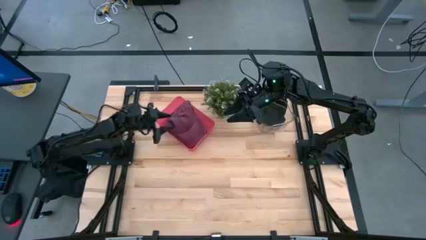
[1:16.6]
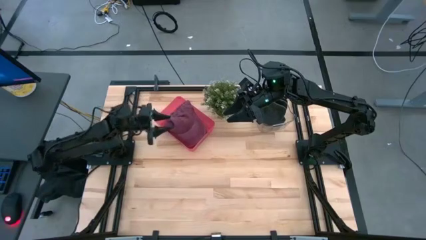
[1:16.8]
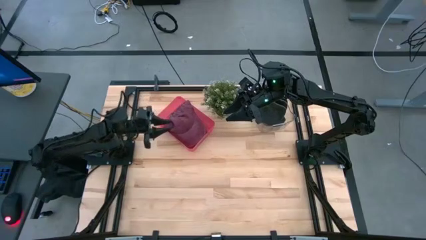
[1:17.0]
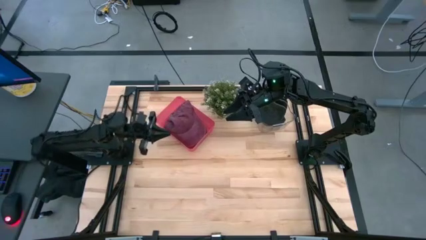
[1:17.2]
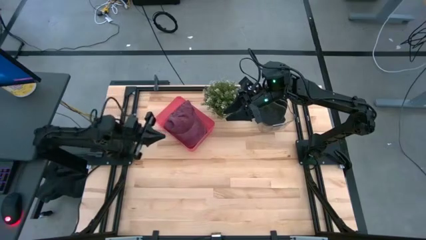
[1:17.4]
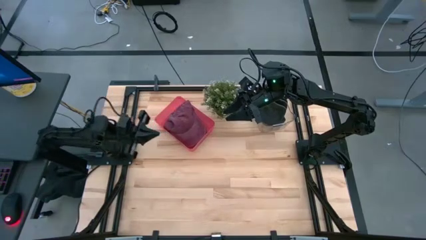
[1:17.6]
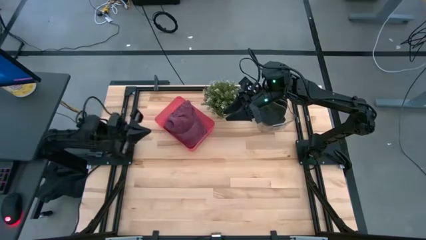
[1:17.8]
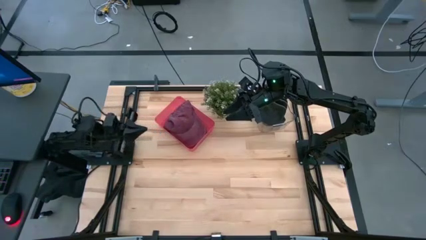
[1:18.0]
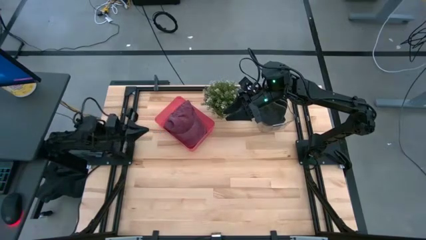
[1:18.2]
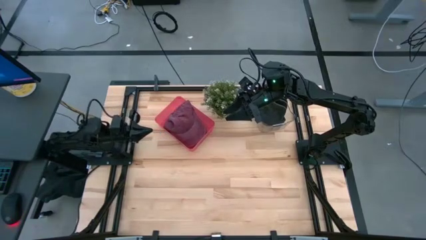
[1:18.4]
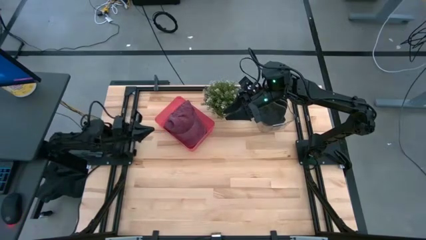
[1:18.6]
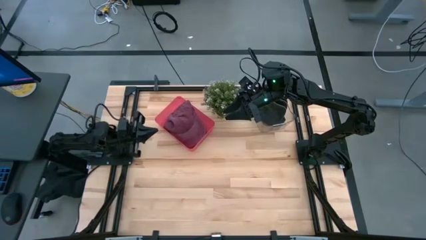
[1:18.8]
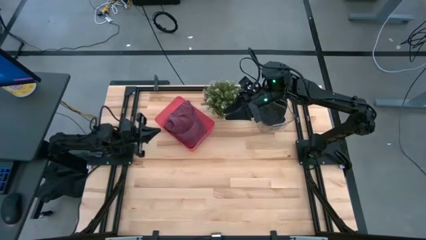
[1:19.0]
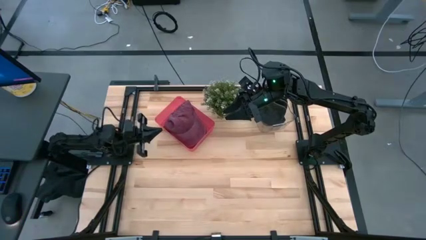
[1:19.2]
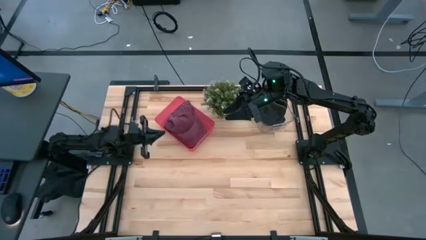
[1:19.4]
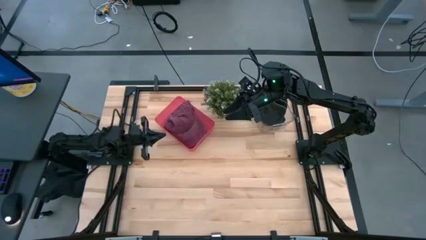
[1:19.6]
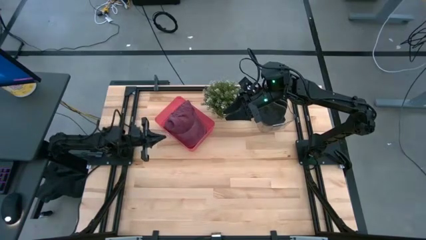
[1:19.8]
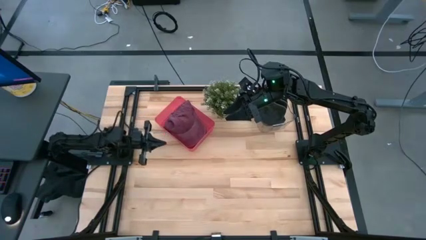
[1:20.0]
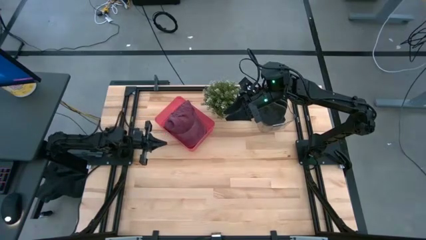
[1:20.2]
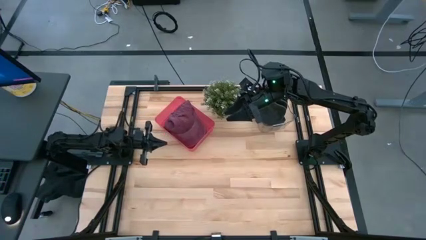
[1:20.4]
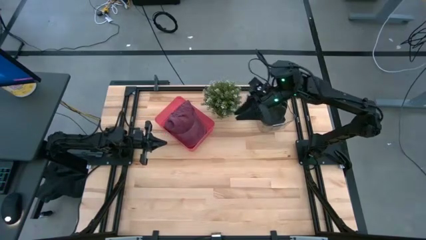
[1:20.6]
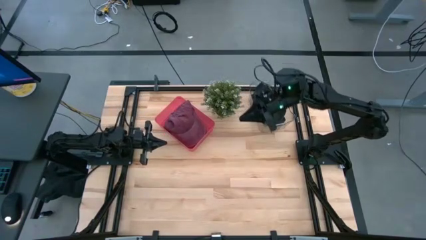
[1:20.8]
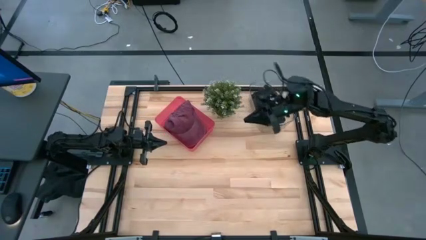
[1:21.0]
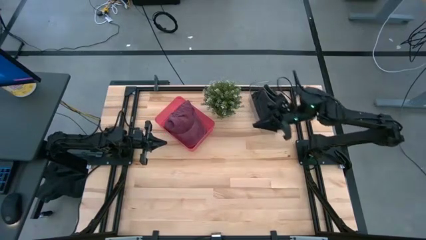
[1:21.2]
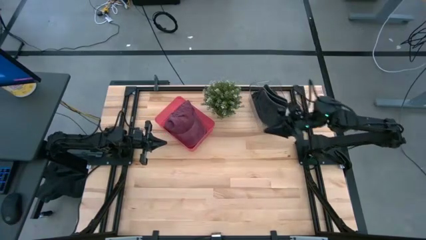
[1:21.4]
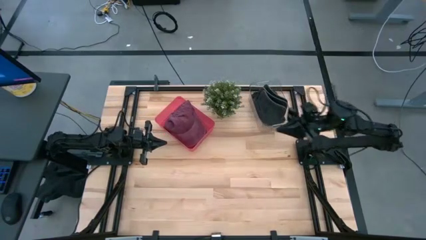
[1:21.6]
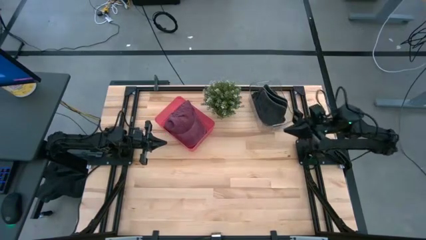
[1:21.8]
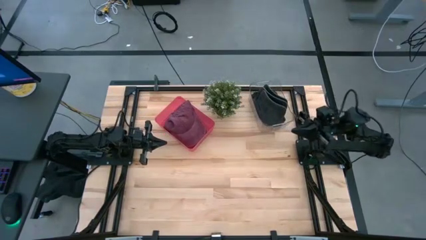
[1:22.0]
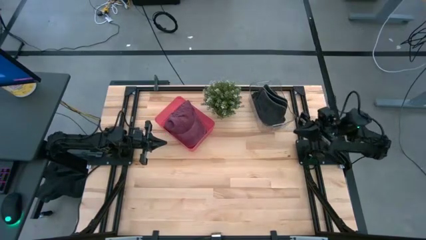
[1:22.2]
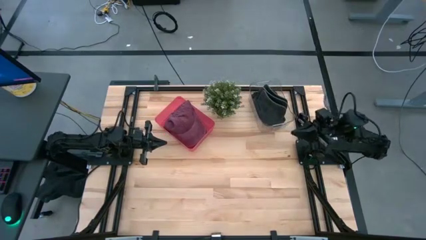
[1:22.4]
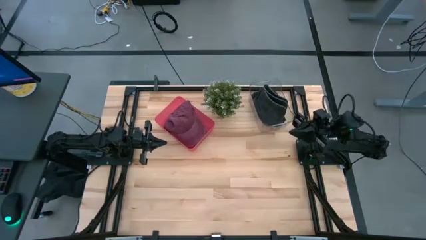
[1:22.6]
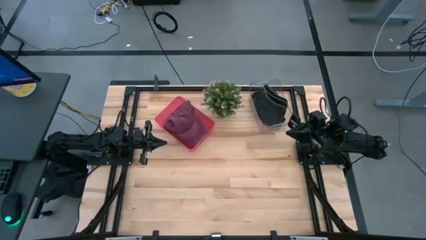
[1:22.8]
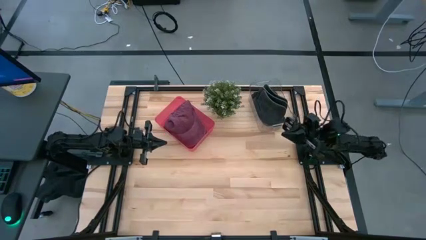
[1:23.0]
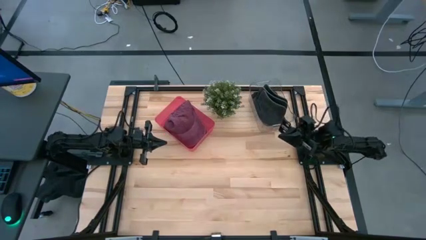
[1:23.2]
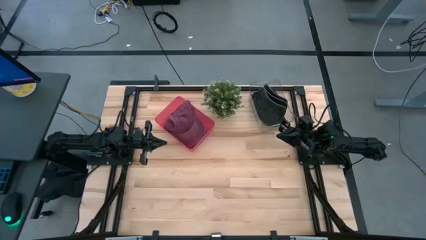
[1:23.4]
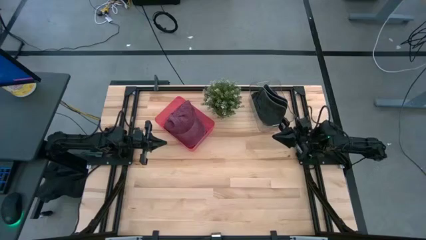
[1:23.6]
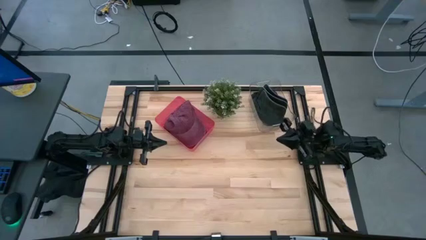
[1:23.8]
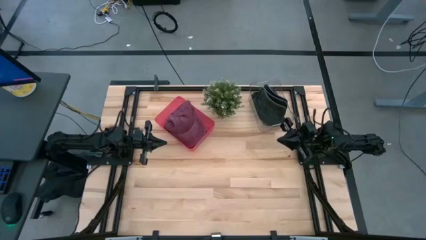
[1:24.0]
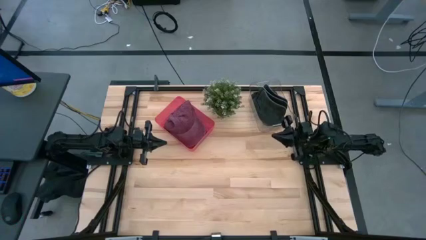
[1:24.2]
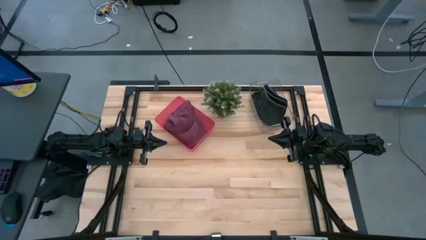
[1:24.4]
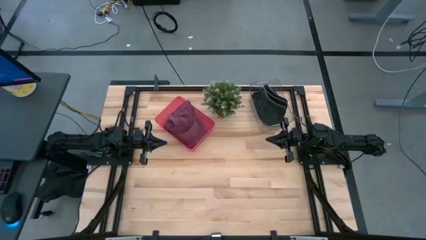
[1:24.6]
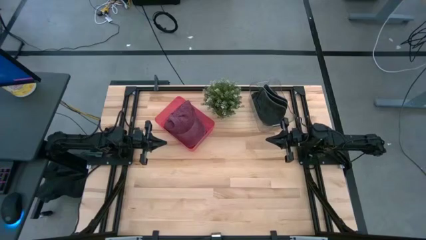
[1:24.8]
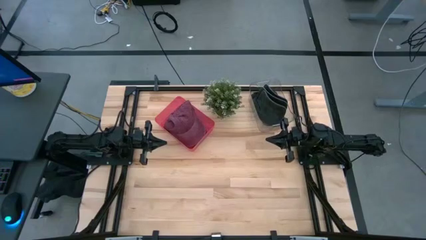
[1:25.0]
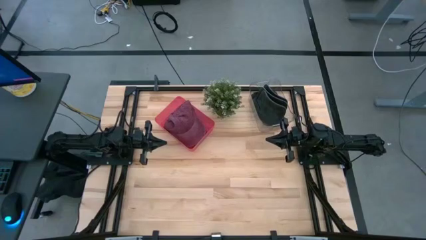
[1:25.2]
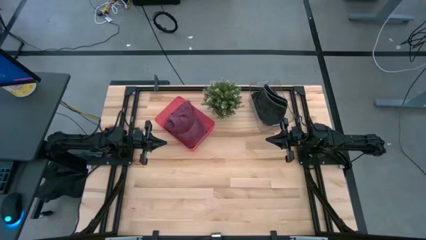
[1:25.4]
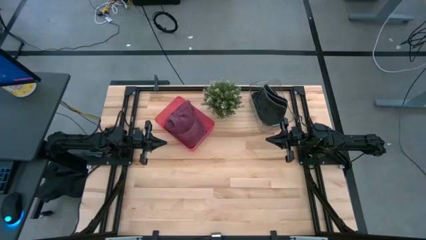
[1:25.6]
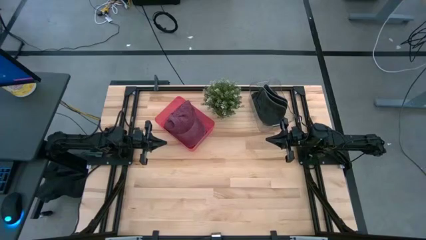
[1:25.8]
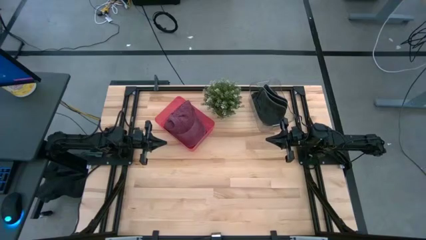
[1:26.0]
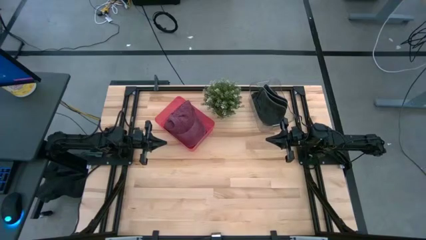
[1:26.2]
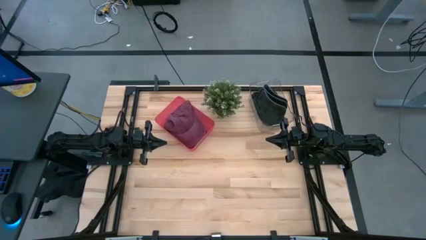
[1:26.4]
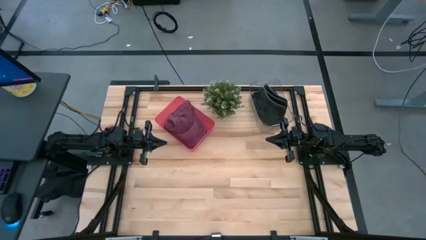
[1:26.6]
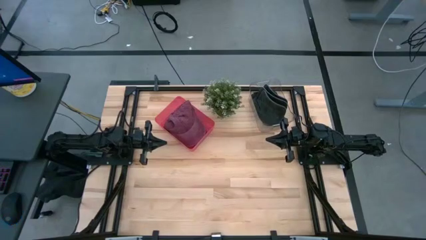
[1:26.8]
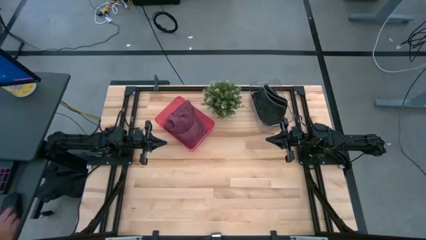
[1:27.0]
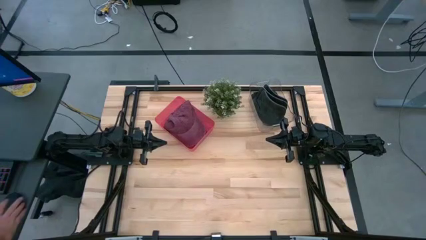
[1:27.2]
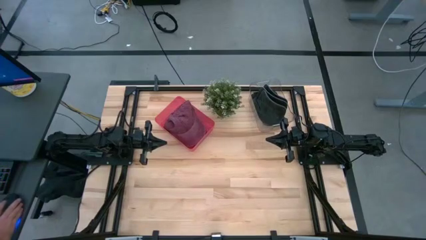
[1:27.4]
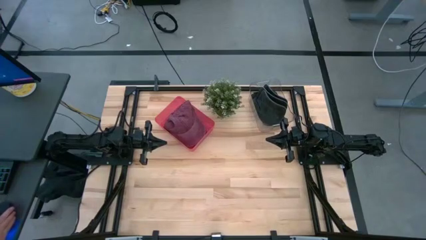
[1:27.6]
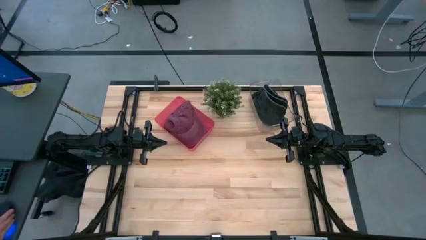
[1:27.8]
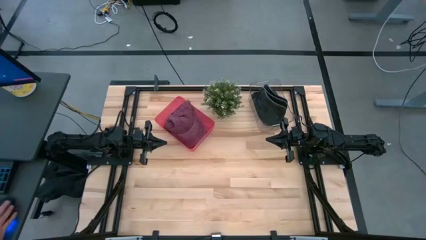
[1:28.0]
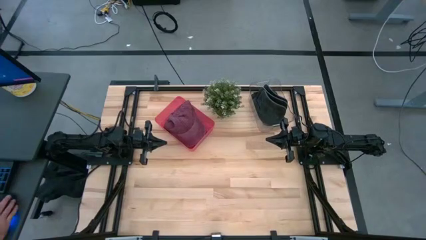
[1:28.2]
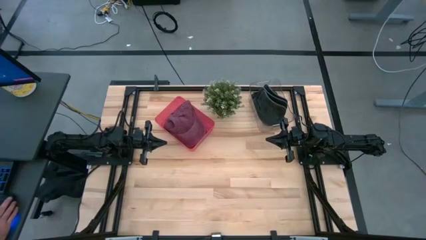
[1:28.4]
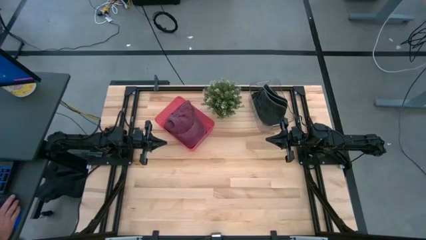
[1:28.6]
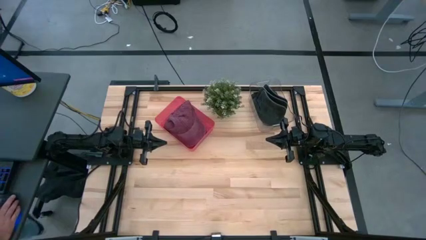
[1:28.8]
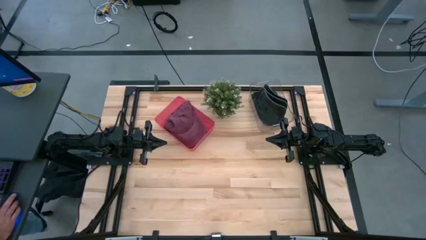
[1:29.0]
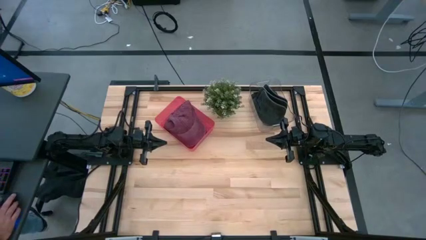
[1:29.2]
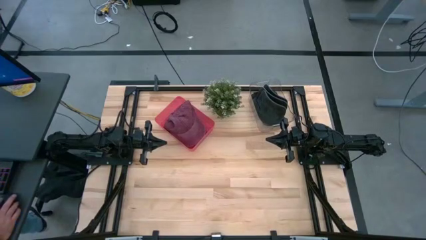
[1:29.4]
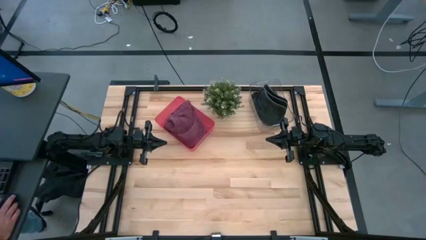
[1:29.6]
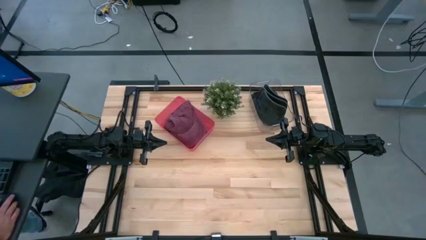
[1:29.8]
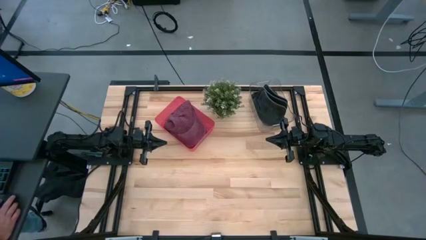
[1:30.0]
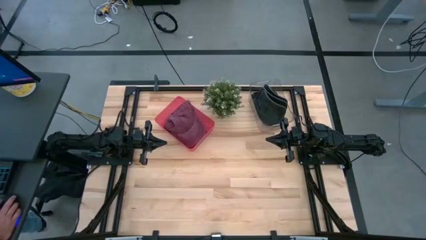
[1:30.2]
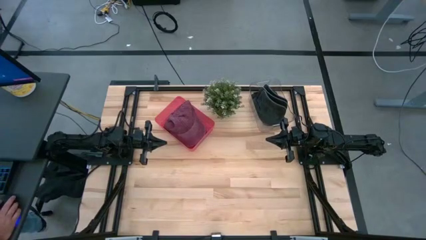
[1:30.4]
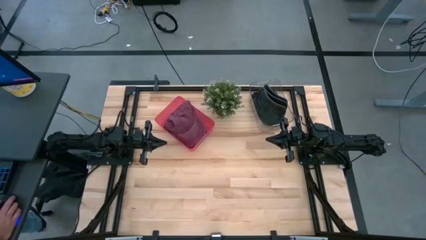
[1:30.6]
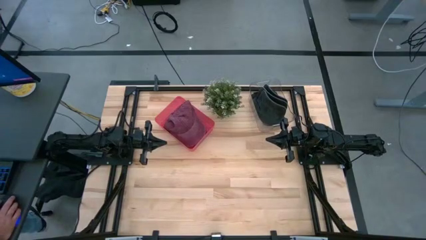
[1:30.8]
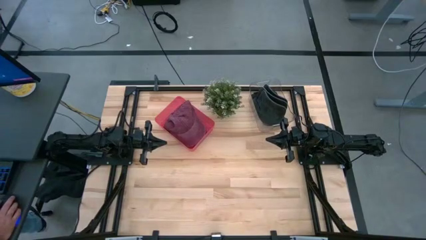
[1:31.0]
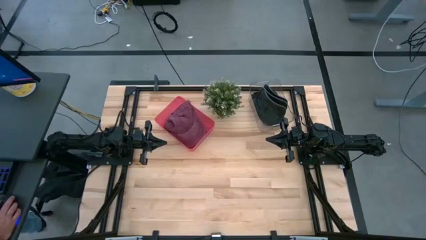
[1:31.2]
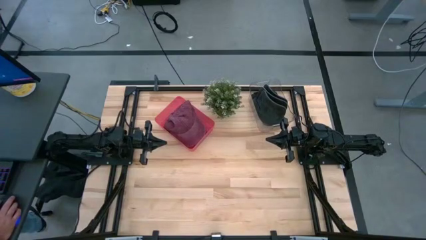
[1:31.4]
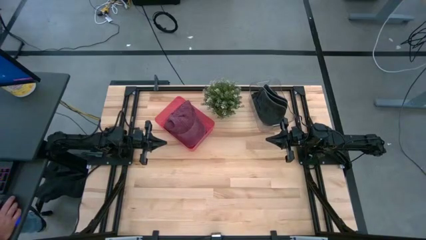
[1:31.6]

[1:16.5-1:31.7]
Task: Pick & Place hat
Return to Home Position
